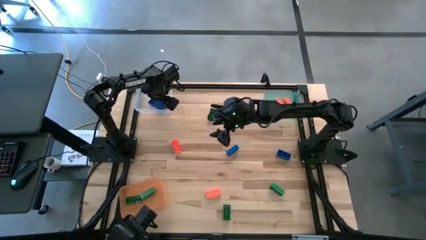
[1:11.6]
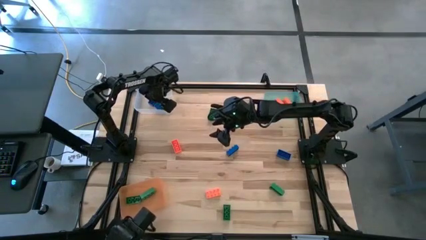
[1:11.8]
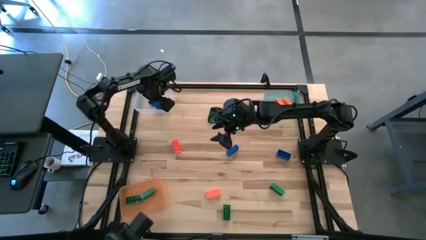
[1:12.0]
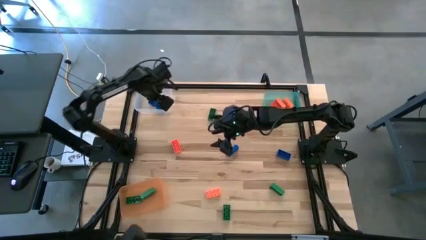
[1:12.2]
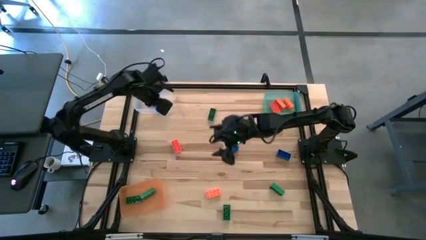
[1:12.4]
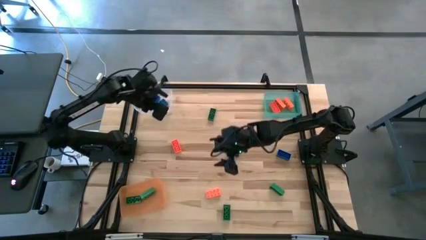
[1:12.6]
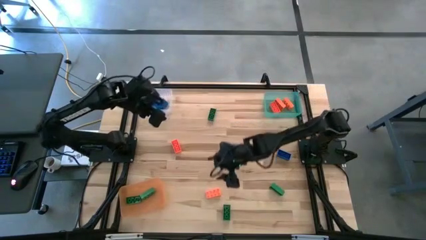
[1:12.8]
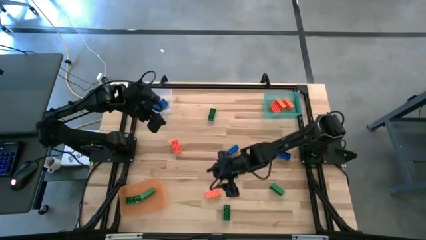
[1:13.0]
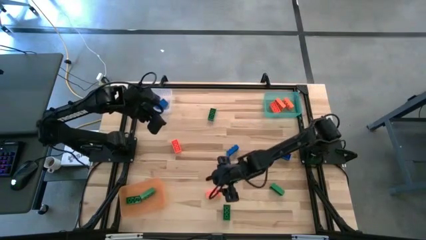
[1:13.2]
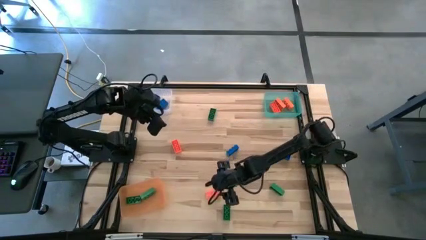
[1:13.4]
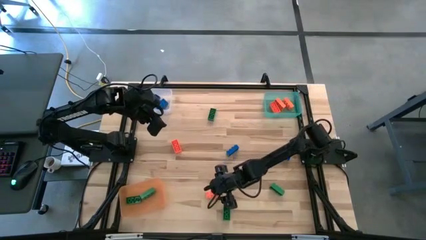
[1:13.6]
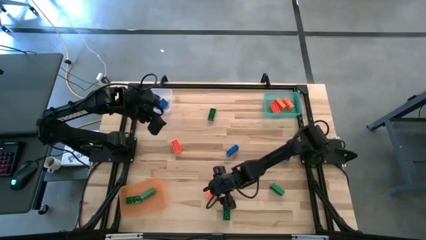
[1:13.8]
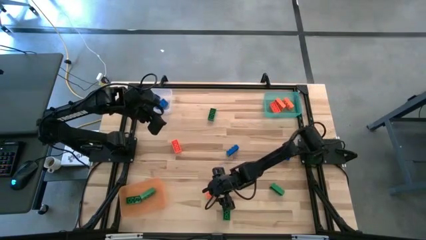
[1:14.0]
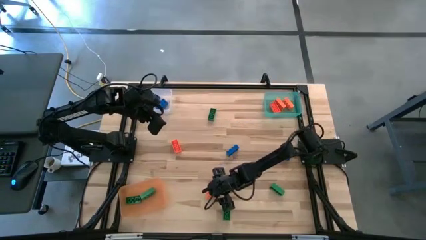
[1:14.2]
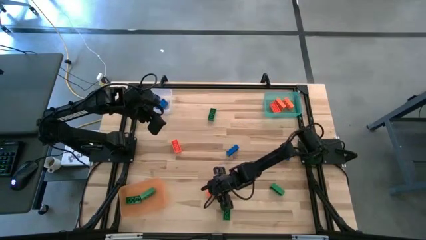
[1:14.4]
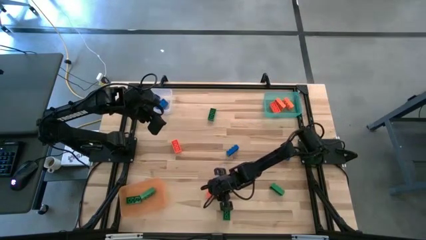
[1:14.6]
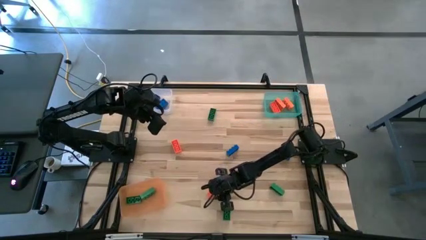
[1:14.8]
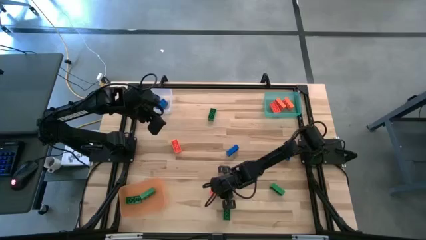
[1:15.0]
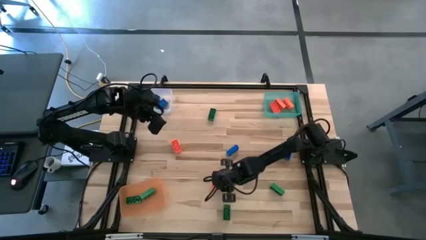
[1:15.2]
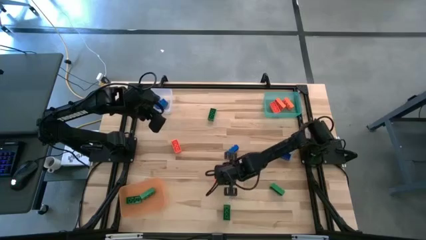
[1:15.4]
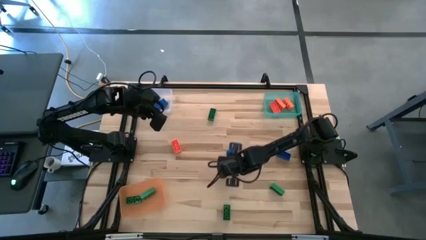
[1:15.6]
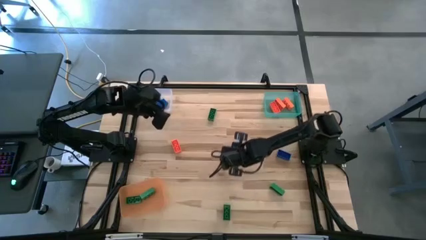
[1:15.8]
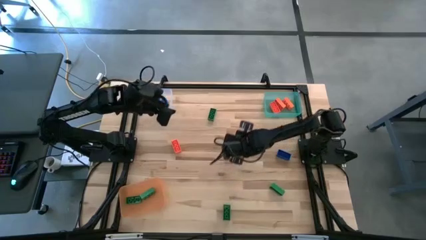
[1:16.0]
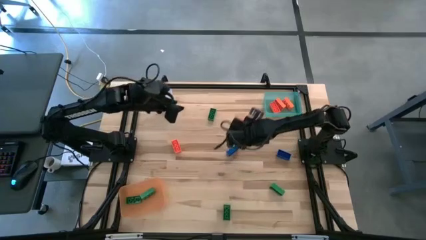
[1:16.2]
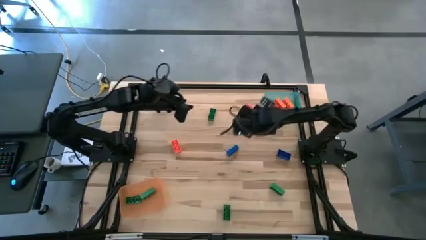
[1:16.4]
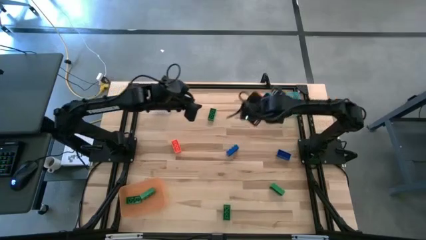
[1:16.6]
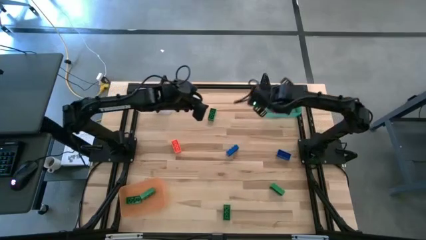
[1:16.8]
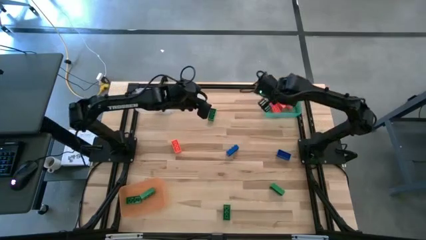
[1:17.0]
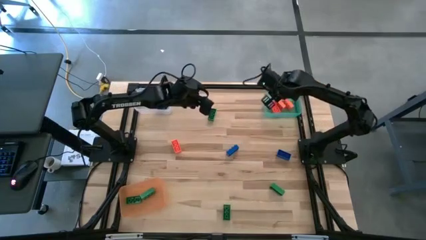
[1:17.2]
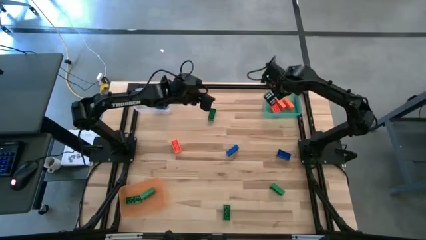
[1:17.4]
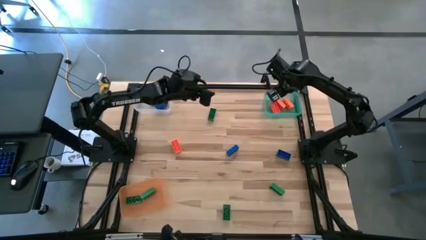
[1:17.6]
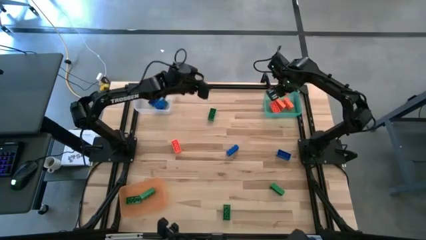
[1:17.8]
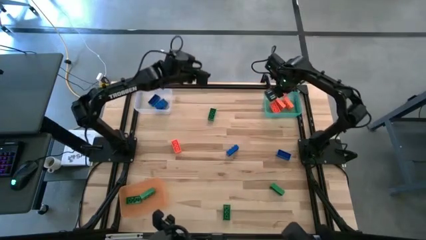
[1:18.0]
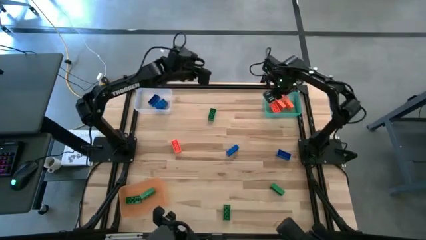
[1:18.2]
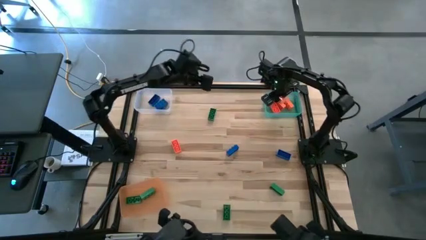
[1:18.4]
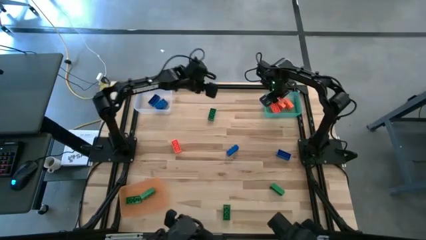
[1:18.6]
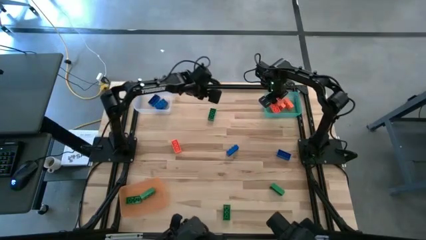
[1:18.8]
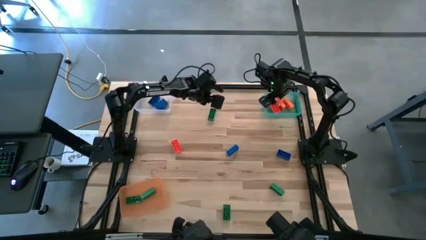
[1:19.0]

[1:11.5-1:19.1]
Task: Sort & place blocks by color
Put the orange game piece into the light blue bin

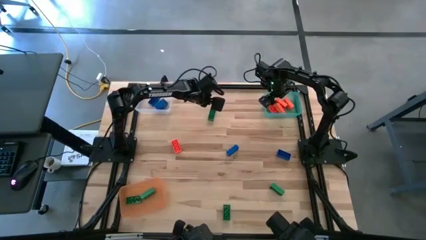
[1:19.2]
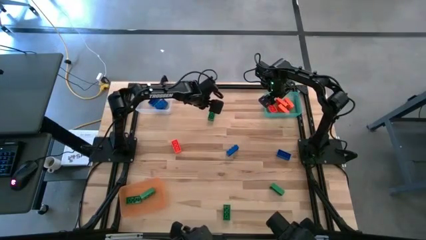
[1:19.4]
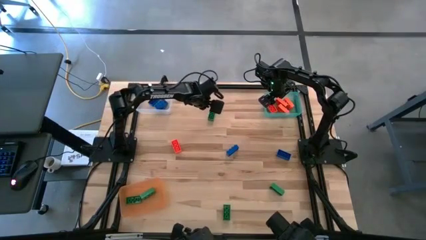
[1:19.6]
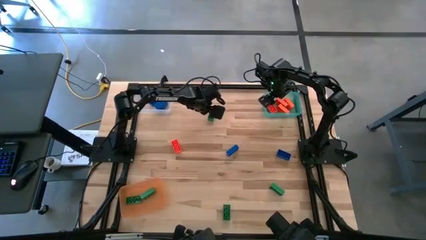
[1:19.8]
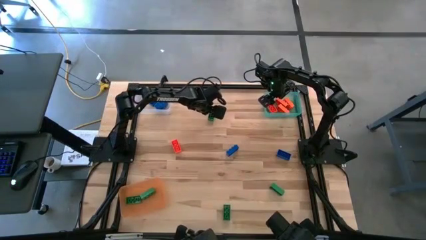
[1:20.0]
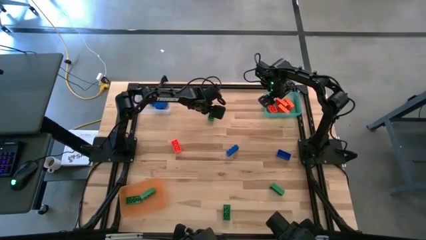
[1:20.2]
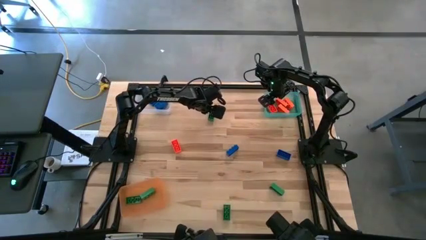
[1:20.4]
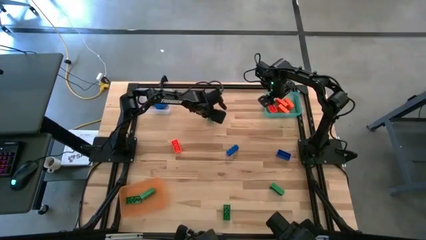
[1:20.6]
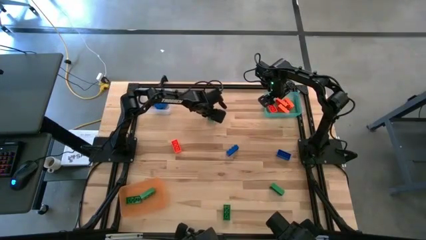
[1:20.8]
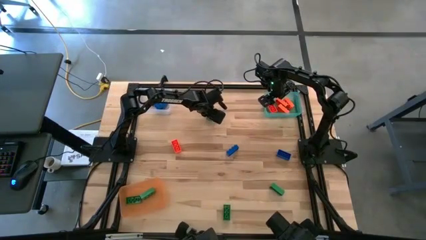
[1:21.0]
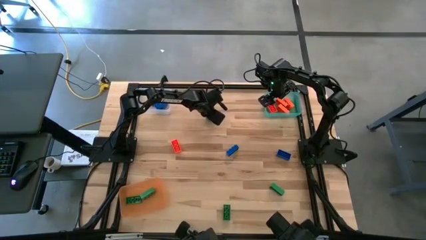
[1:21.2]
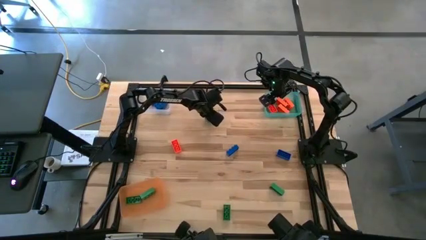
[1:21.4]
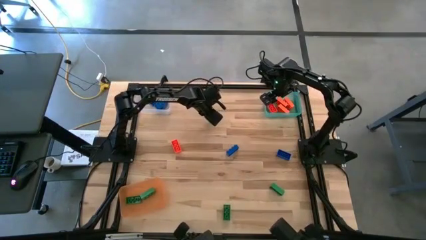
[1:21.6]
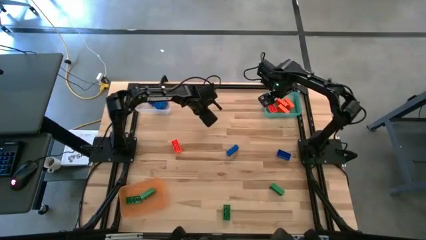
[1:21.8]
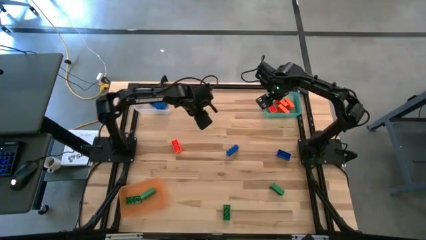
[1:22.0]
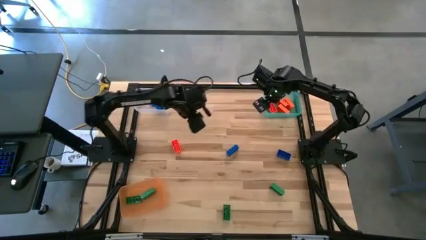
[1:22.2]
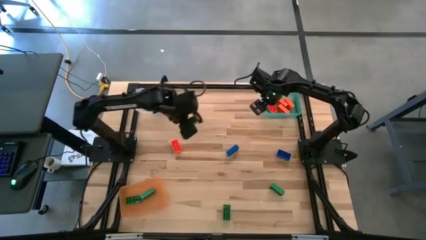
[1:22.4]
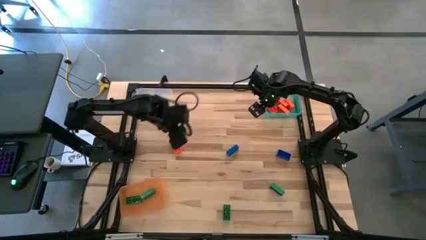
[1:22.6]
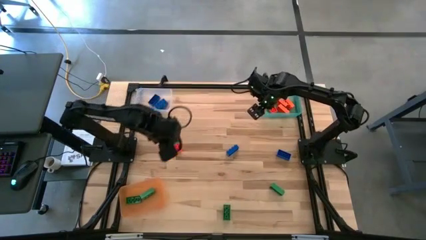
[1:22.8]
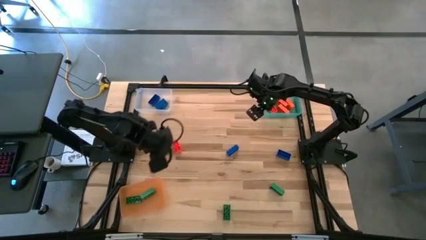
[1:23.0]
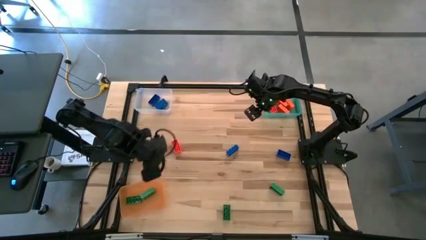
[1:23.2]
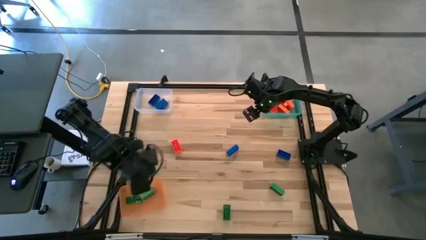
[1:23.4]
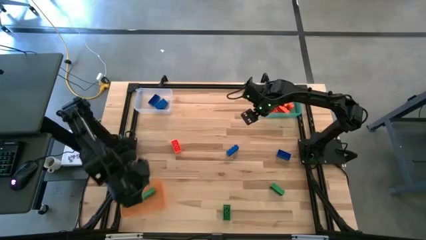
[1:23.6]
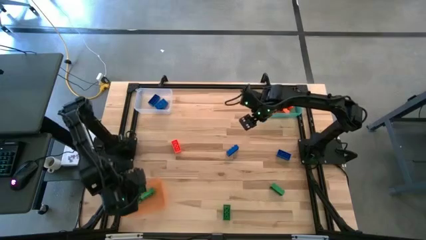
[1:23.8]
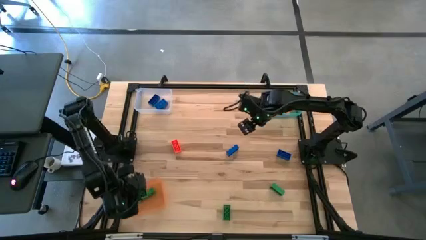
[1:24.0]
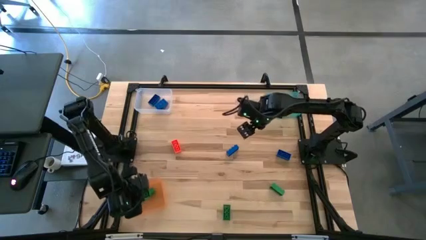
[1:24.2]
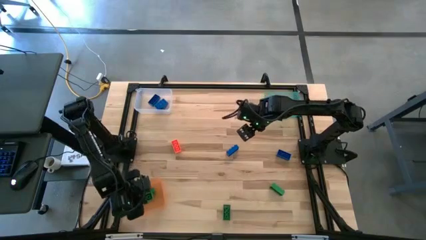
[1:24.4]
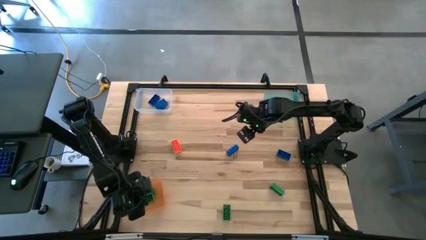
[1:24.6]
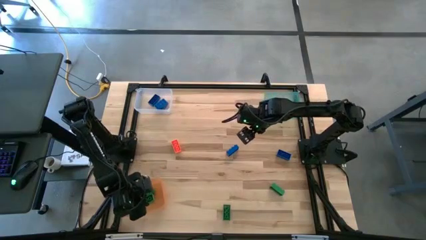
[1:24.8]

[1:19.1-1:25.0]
Put the green game piece into the orange bin
